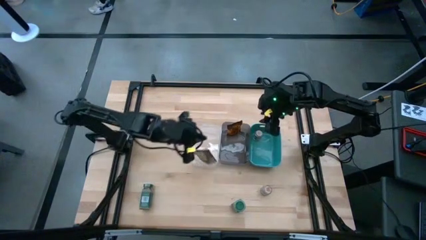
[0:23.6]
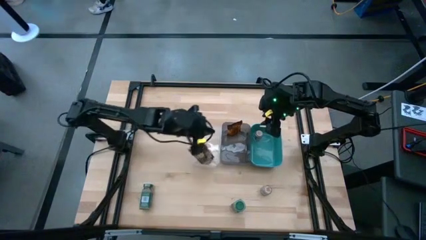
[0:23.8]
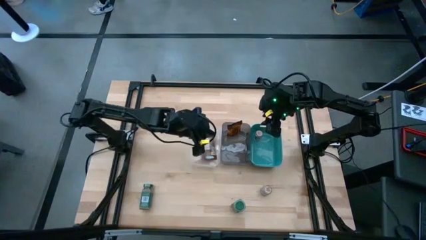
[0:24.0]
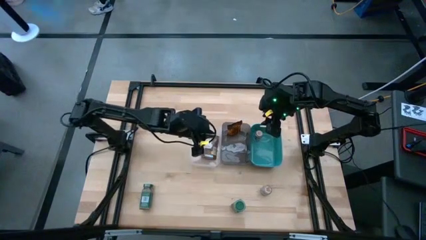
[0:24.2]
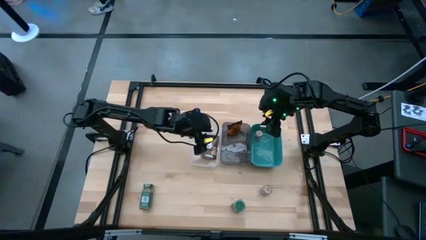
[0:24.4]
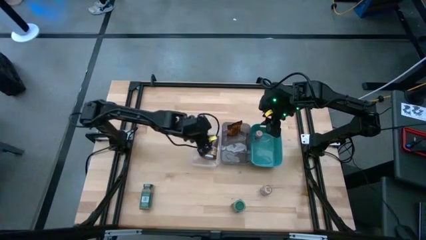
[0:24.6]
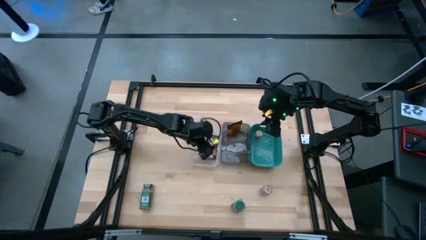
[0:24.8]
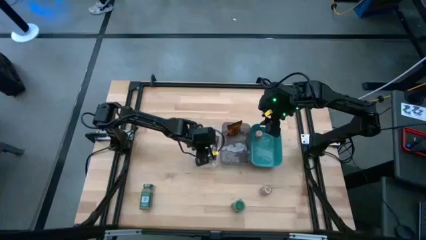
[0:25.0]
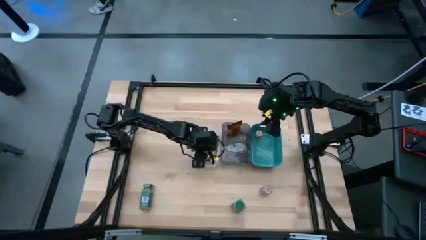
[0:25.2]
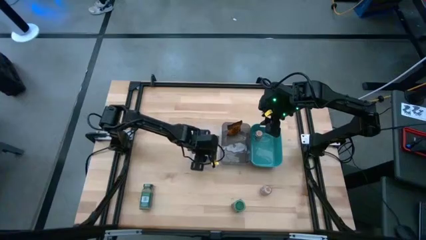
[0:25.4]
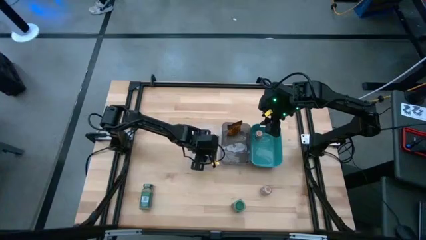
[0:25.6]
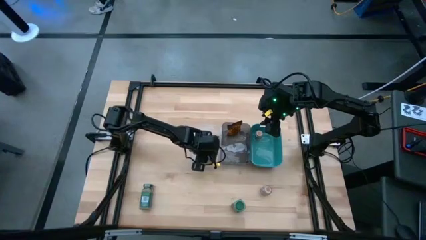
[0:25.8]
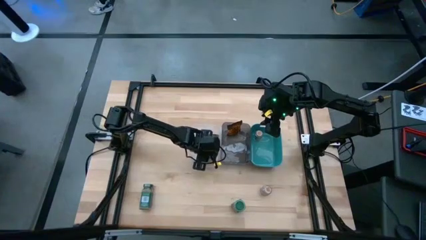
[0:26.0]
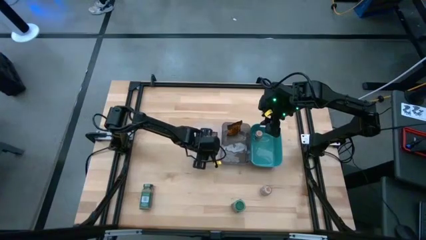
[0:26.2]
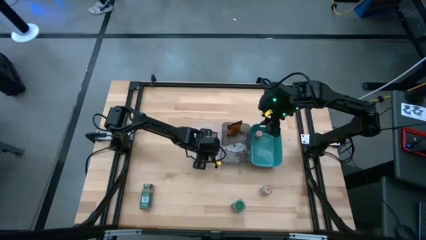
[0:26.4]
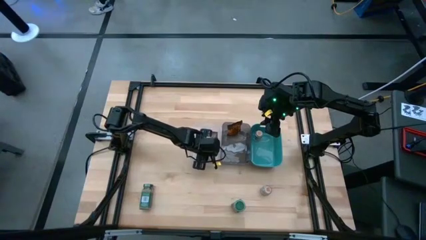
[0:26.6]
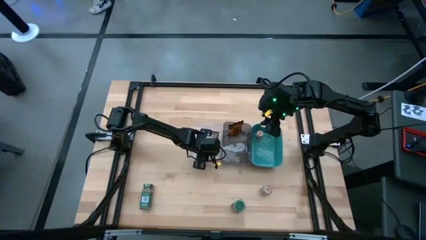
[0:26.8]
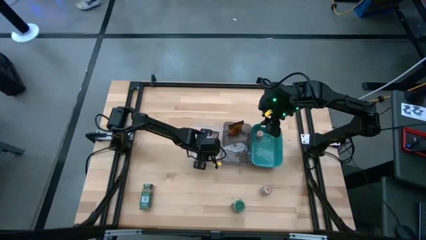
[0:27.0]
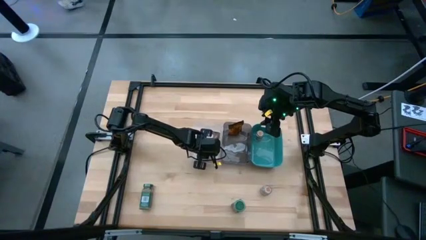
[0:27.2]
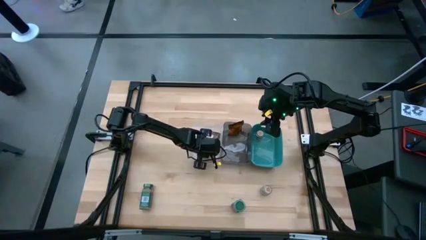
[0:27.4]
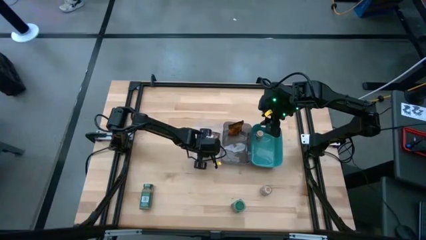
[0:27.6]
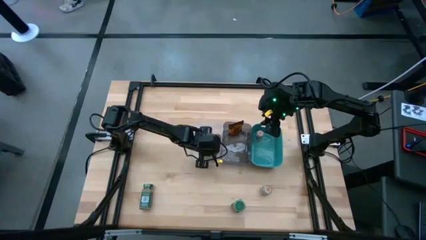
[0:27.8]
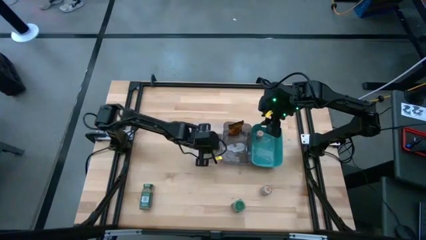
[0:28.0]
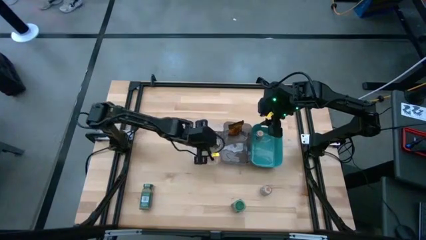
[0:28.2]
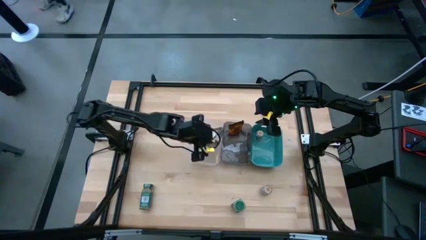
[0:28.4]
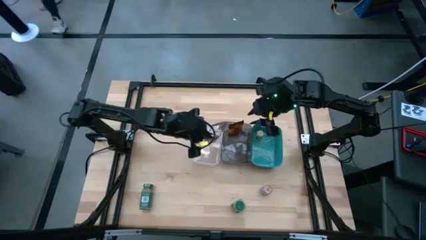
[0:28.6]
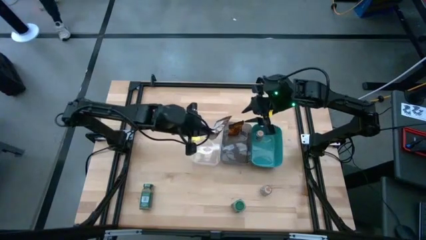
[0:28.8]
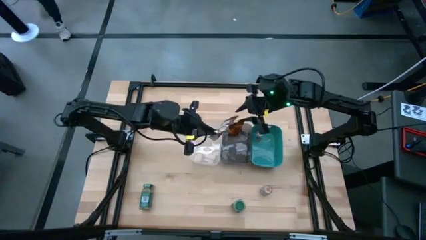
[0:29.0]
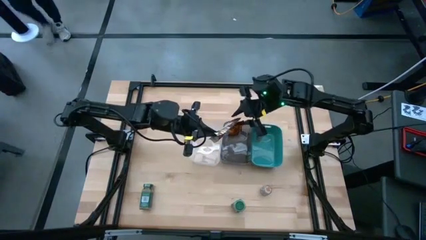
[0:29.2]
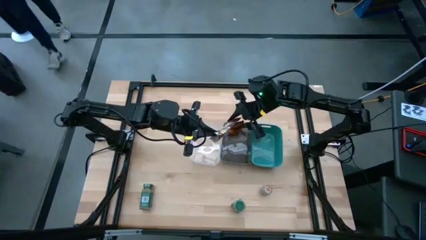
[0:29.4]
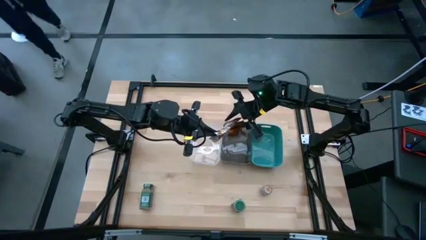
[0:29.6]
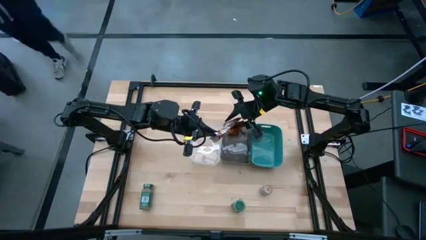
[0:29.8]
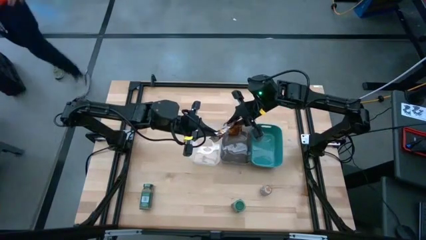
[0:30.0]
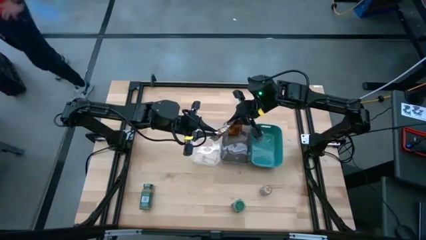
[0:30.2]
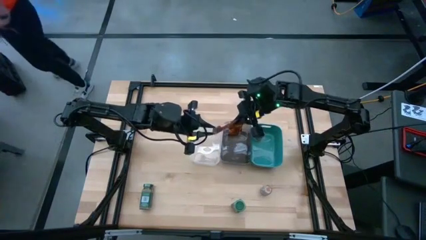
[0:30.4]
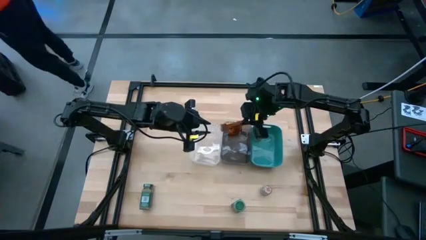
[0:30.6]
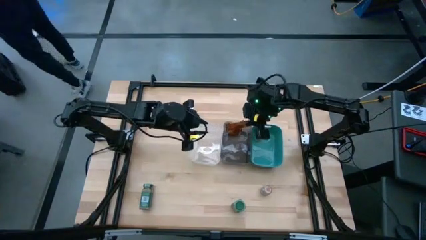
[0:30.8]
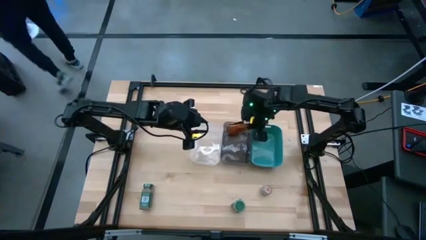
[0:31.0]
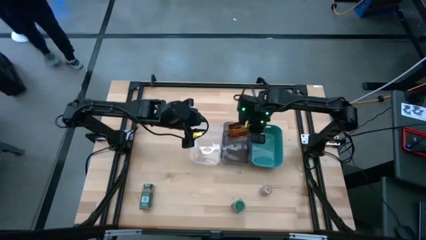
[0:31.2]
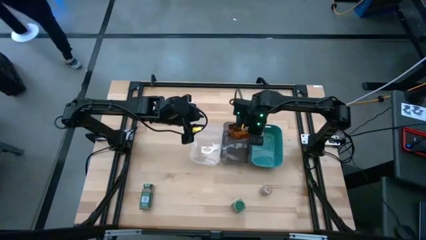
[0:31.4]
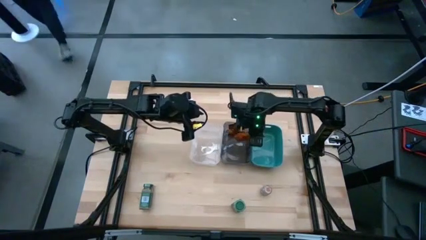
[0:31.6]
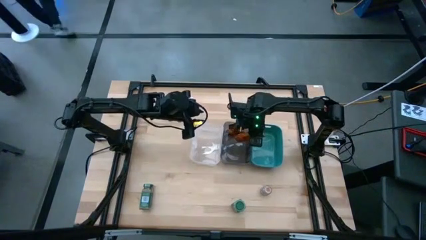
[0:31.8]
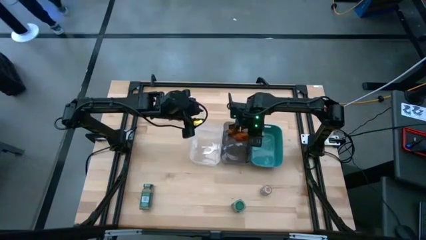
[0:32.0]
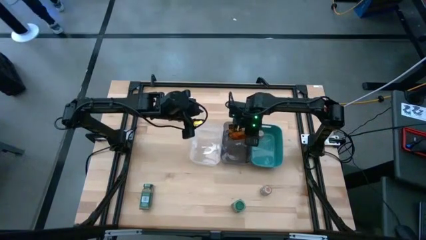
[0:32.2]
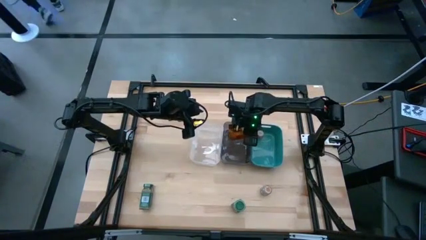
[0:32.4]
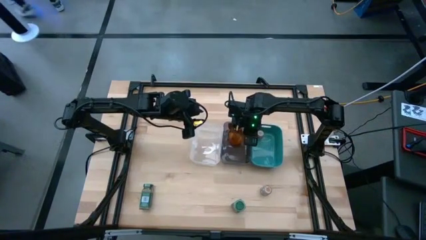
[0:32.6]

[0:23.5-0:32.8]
Task: Sort spices by type
Put the orange seasoning pack into the black bin

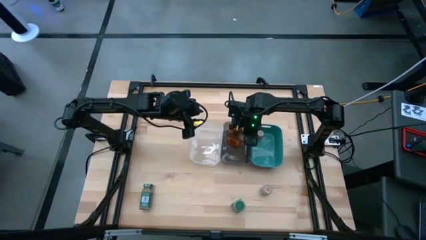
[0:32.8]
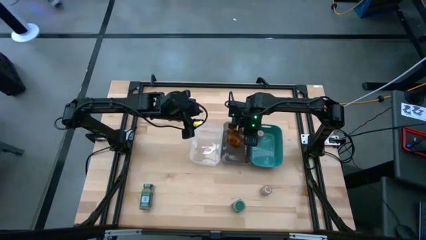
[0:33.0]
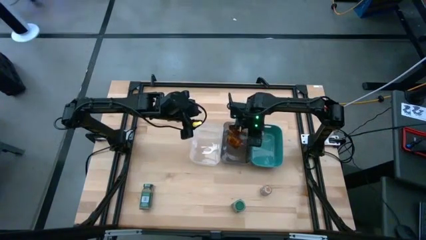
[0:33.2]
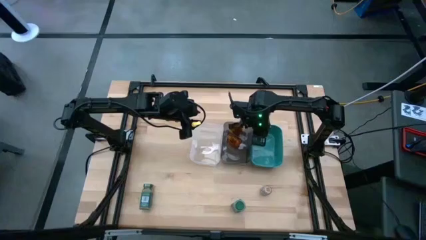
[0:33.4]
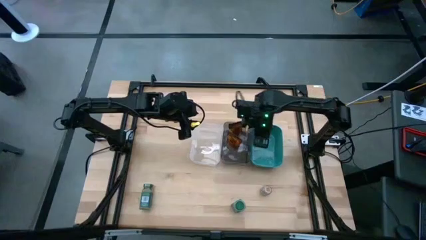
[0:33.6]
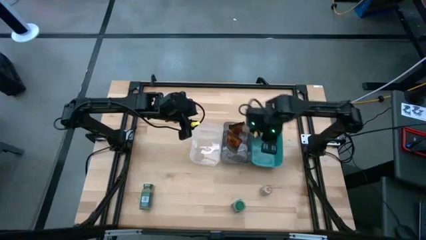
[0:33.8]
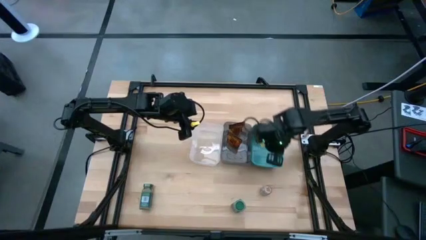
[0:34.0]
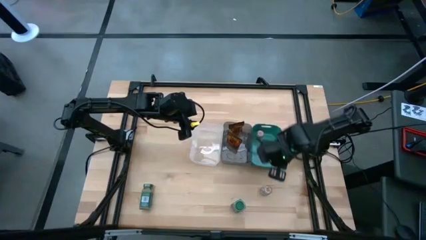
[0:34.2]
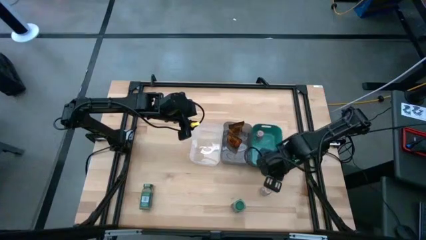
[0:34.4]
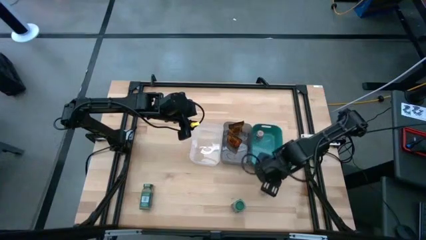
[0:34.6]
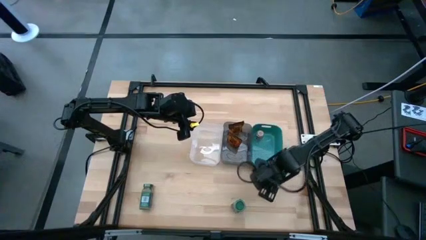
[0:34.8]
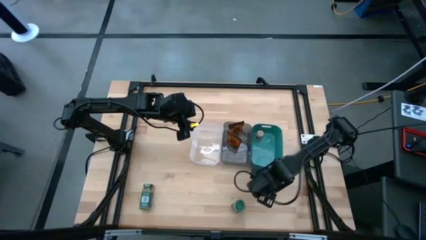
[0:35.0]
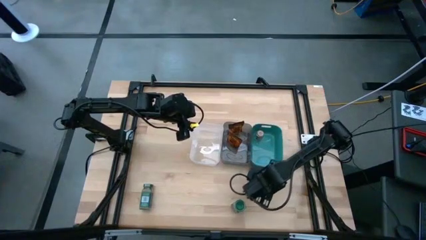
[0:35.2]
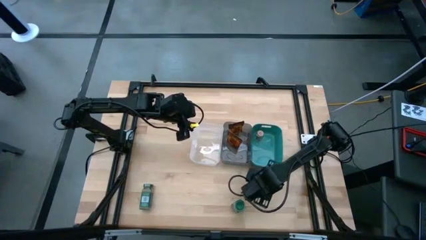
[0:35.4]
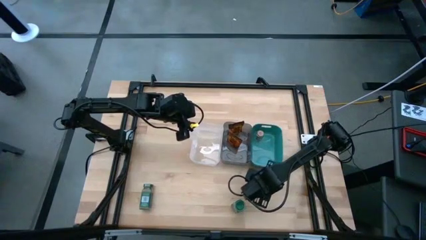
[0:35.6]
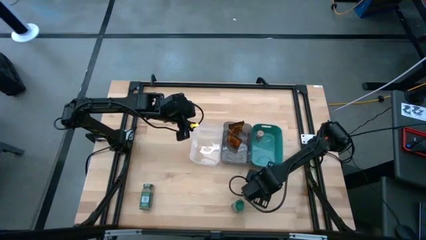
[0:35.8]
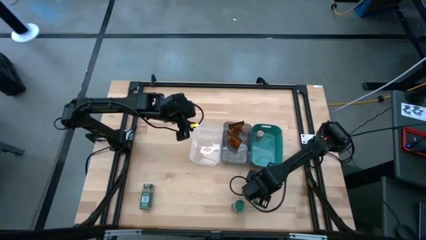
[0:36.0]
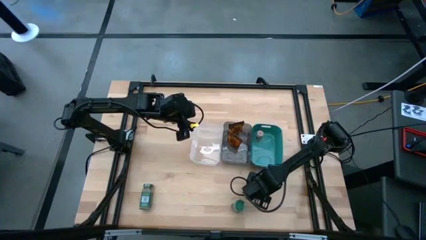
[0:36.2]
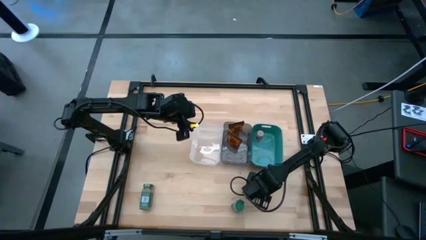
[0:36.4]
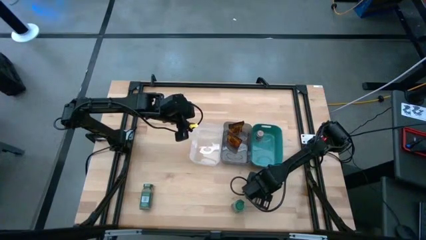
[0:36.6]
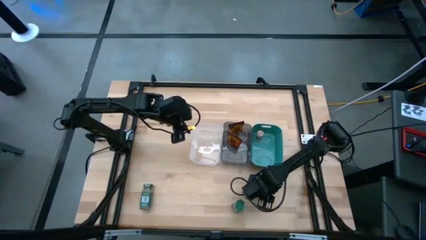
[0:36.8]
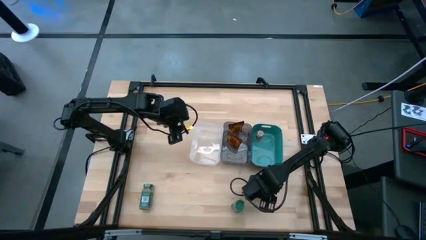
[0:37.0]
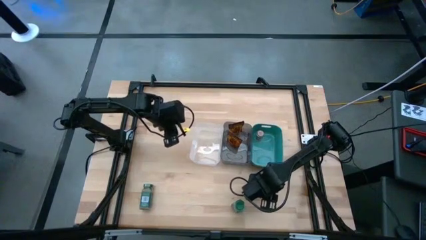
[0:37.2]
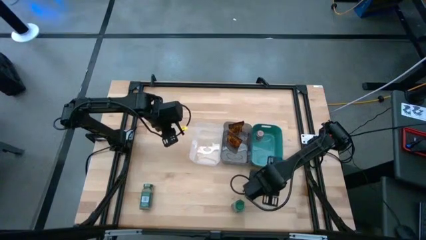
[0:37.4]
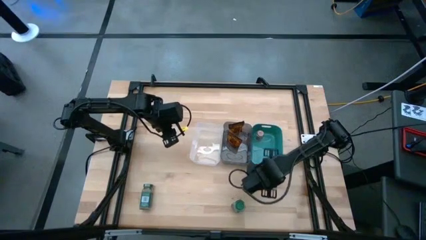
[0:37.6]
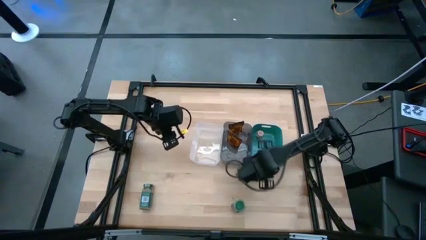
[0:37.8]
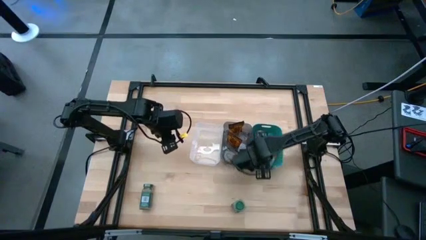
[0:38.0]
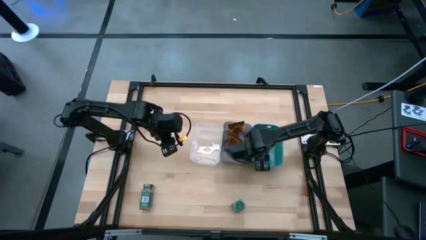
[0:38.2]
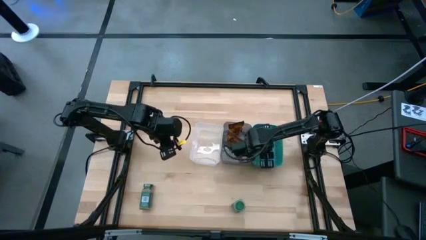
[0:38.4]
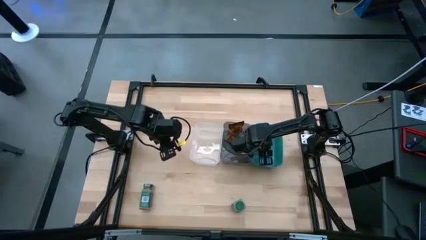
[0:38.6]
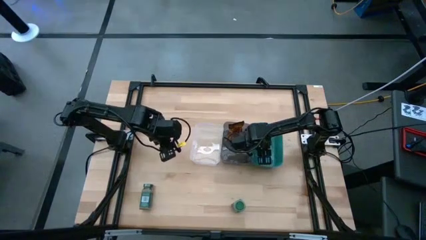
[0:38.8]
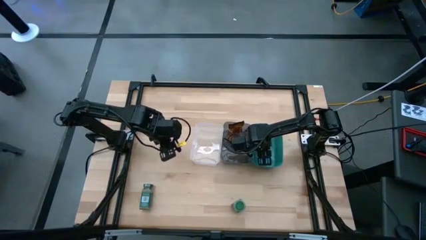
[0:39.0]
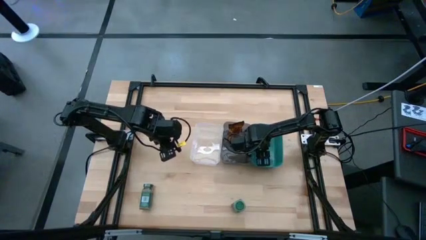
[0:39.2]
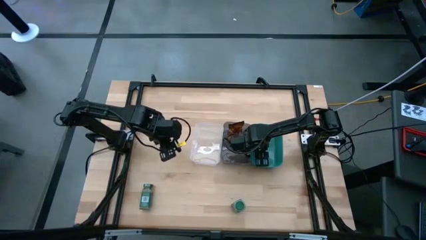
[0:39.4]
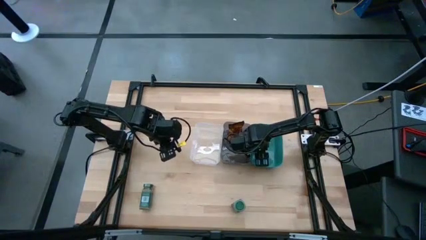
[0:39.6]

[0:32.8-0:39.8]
Put the brown seasoning bottle into the green bin
